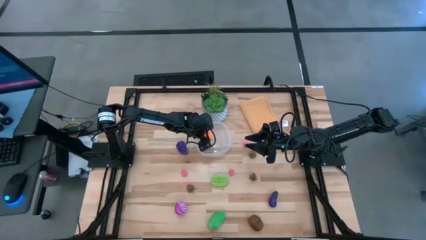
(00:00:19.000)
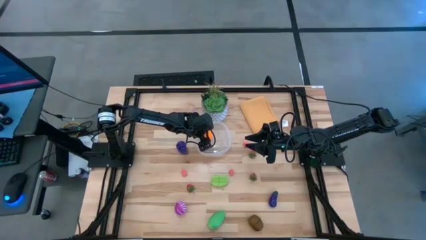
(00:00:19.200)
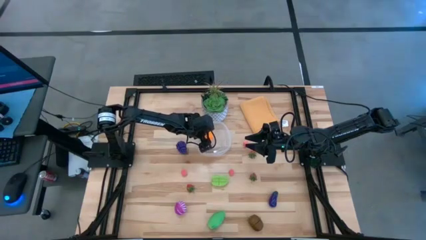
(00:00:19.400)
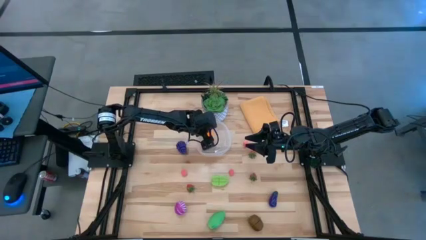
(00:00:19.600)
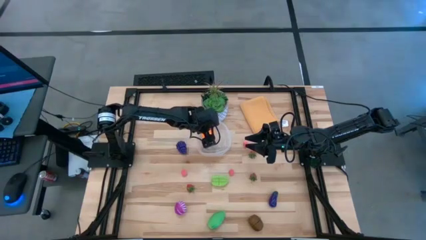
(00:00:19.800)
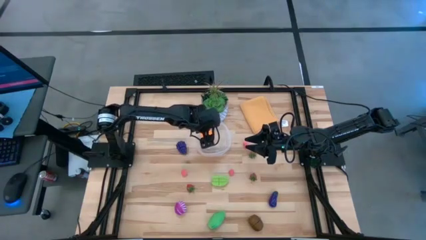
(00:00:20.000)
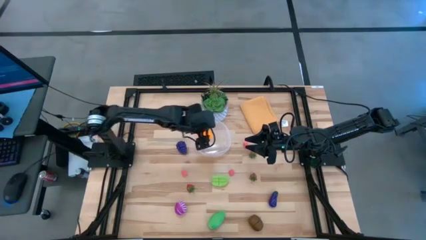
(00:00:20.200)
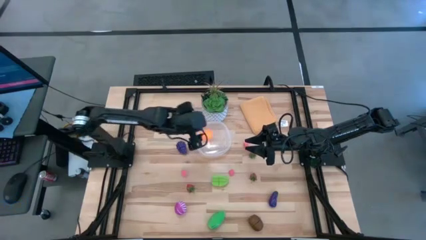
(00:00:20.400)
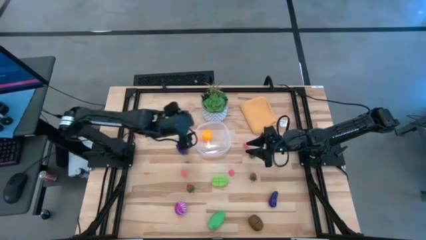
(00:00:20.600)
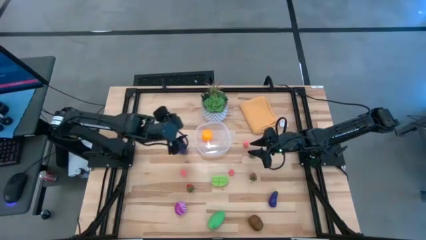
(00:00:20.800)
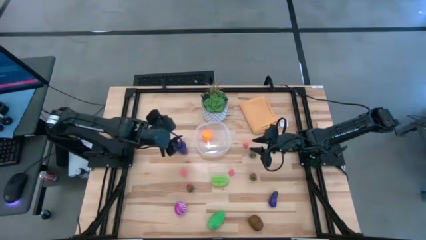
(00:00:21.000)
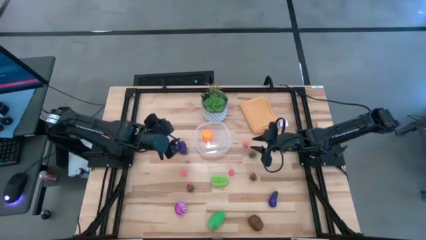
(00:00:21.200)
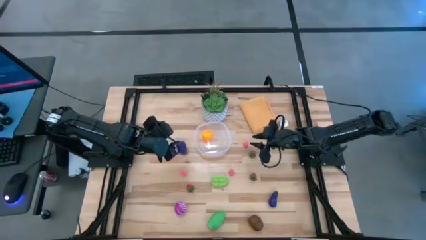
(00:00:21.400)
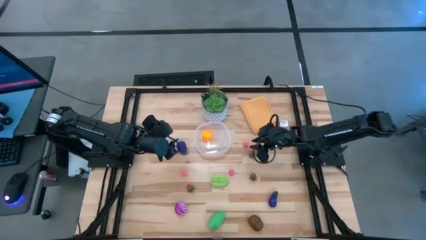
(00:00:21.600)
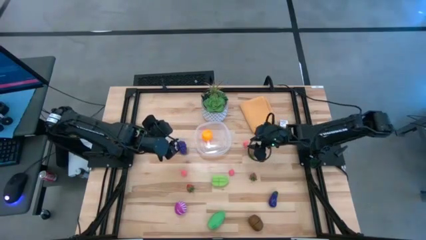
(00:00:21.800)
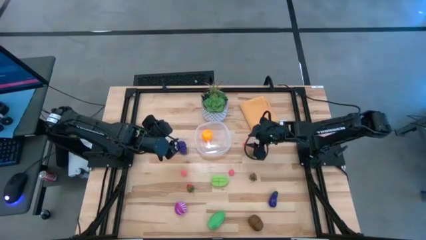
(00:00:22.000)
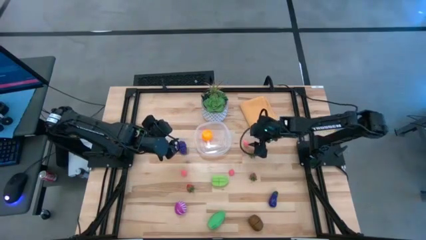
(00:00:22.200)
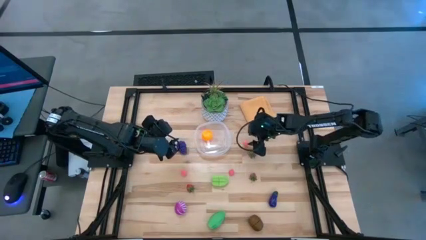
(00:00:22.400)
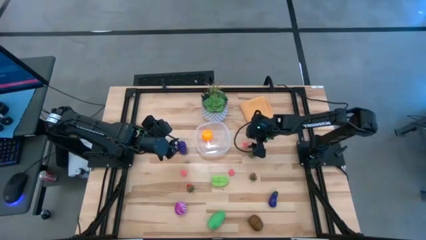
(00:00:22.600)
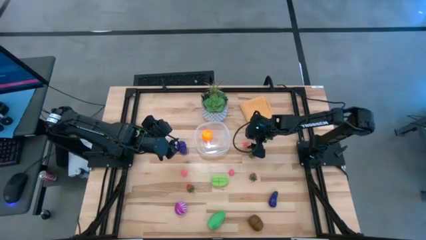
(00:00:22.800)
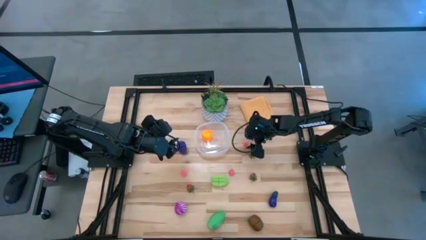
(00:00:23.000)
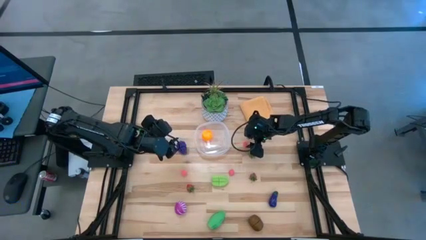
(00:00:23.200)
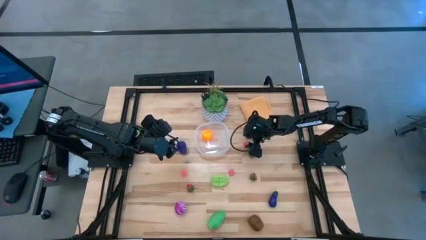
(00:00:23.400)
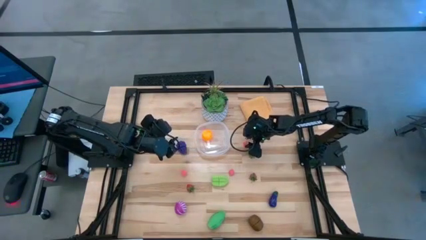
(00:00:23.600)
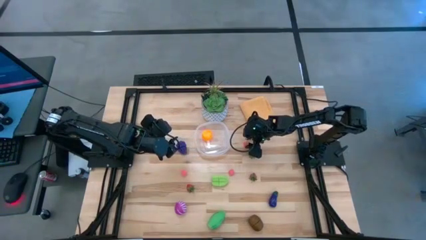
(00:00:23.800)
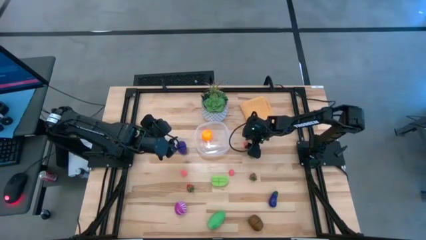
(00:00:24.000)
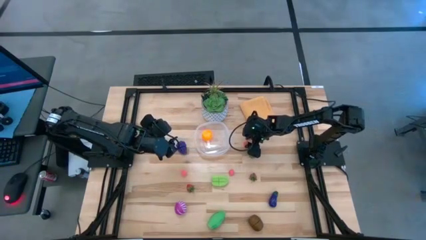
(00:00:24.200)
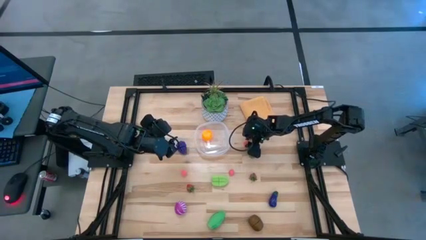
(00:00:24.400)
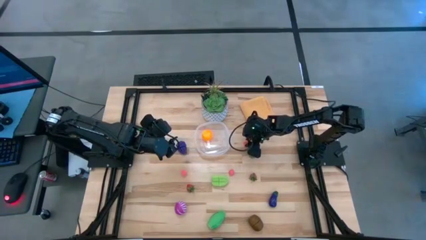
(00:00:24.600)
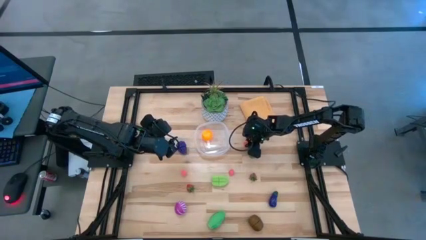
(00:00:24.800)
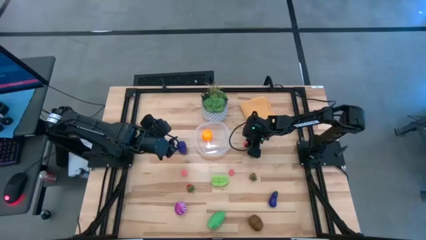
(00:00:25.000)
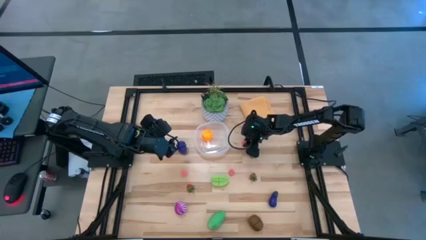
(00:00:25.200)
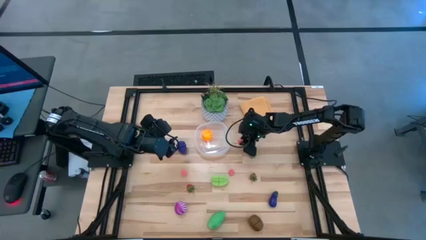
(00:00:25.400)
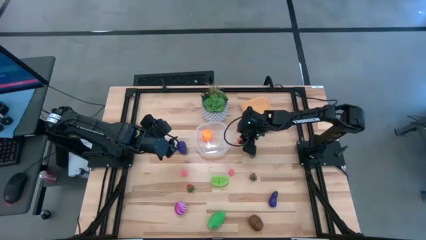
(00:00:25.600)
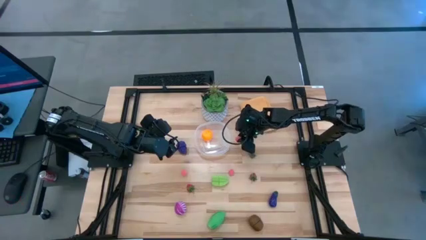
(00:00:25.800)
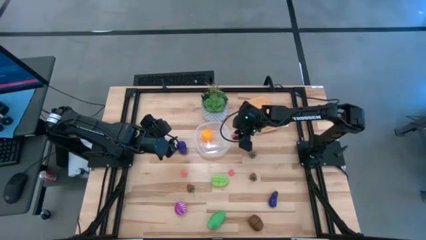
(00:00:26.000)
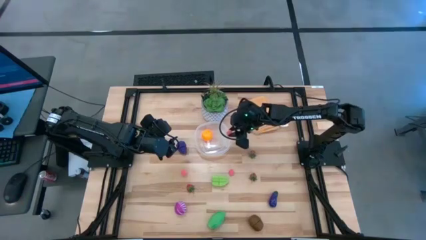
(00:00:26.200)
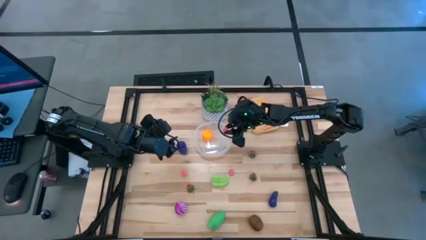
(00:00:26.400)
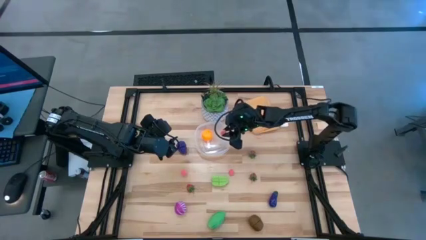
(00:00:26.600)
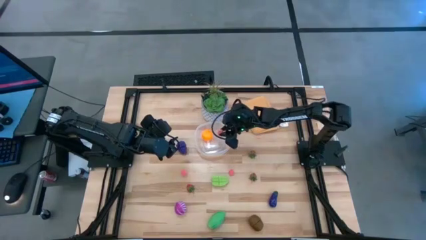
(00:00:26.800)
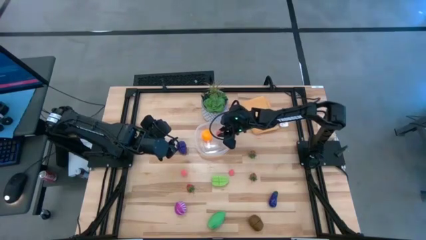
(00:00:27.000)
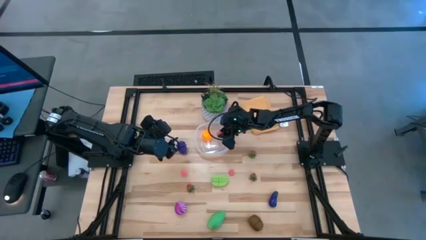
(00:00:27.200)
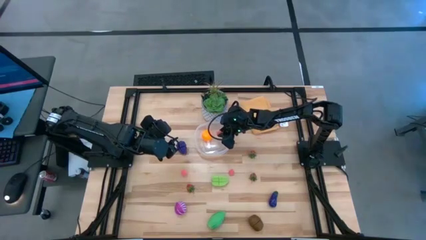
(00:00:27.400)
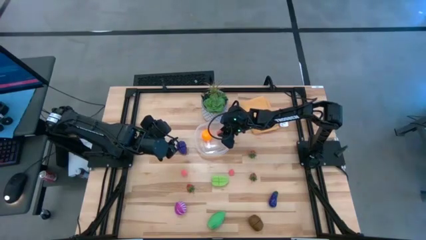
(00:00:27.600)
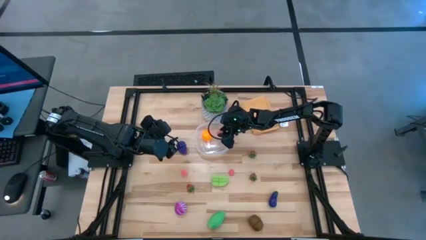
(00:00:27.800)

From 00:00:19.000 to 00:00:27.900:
Task: Pick and placing Produce into tupperware
Put the top right pink peach into the transparent bin

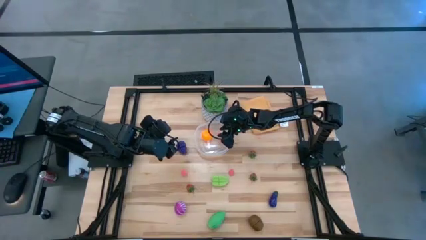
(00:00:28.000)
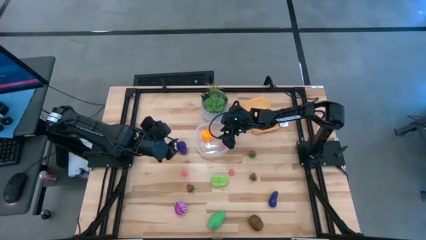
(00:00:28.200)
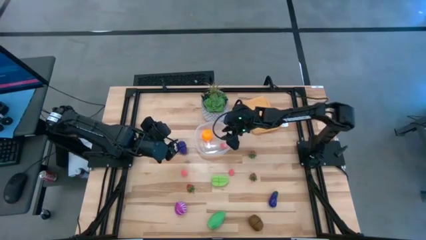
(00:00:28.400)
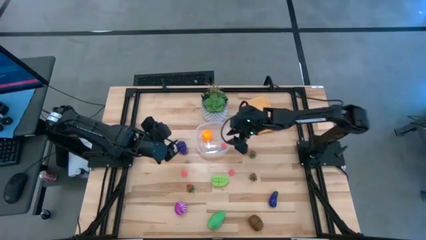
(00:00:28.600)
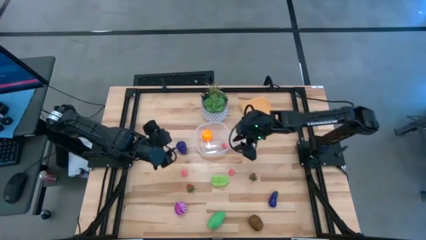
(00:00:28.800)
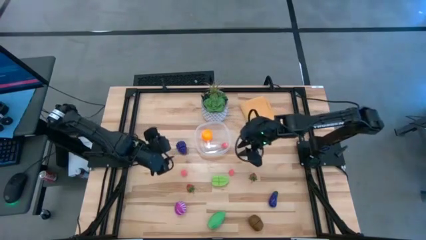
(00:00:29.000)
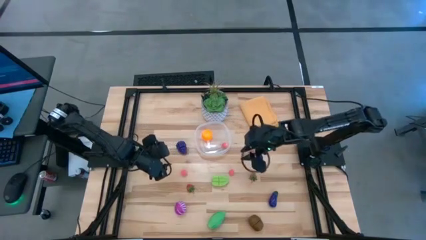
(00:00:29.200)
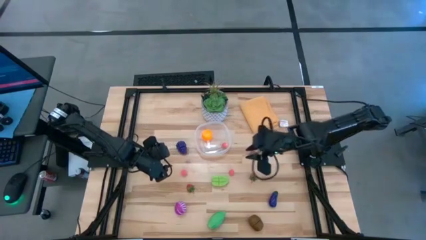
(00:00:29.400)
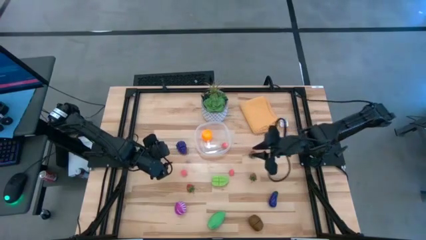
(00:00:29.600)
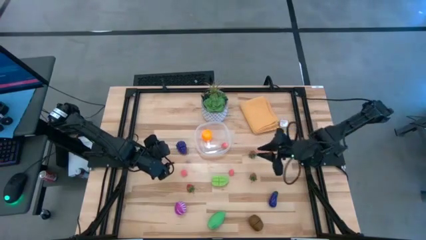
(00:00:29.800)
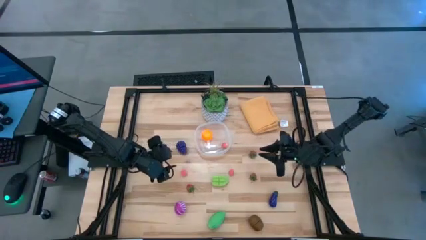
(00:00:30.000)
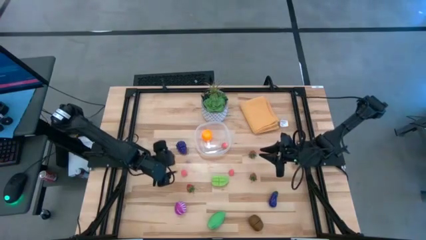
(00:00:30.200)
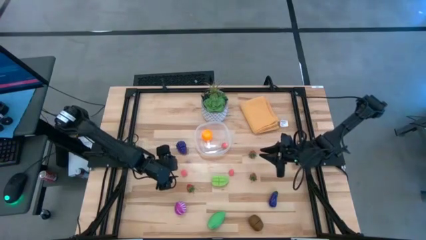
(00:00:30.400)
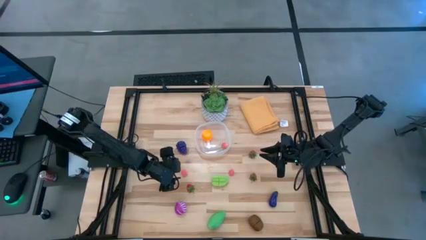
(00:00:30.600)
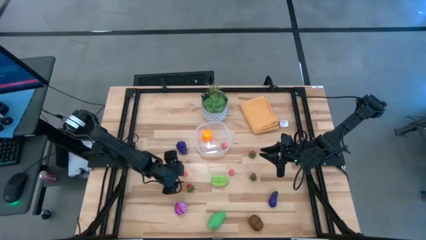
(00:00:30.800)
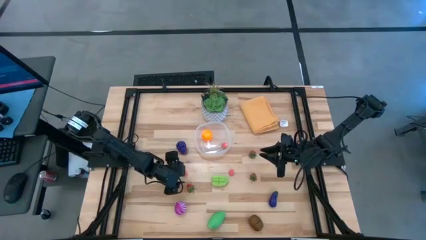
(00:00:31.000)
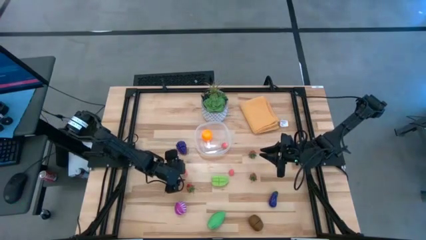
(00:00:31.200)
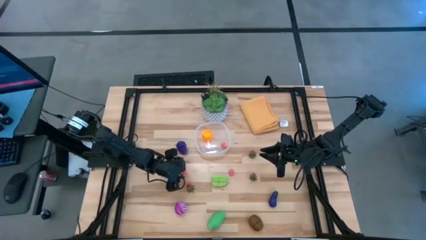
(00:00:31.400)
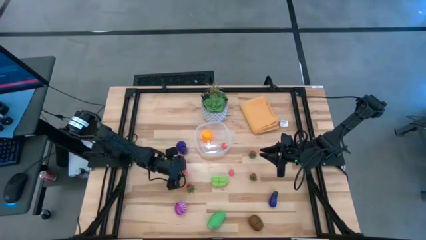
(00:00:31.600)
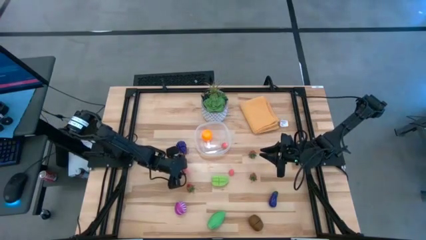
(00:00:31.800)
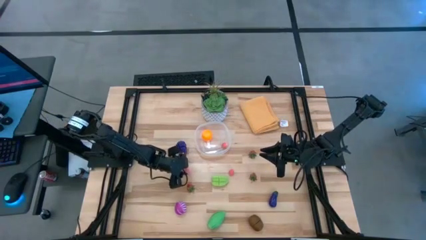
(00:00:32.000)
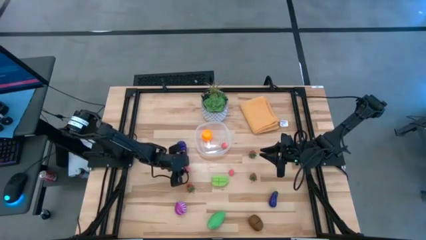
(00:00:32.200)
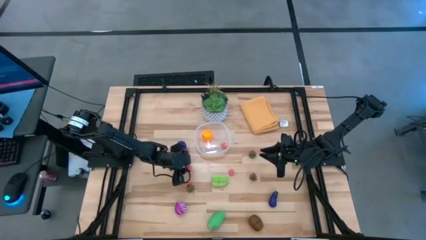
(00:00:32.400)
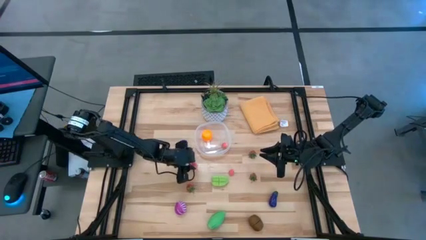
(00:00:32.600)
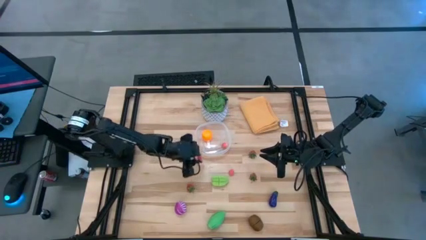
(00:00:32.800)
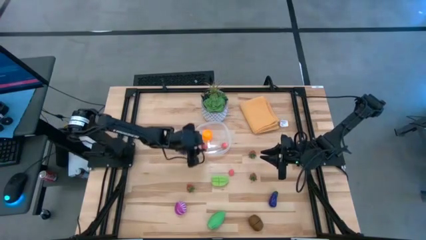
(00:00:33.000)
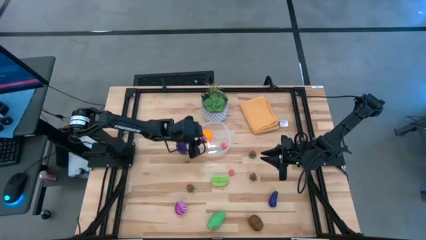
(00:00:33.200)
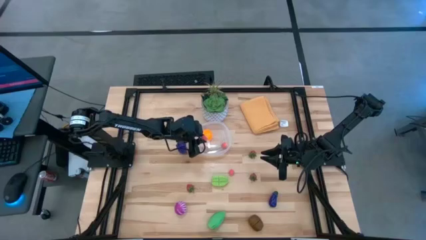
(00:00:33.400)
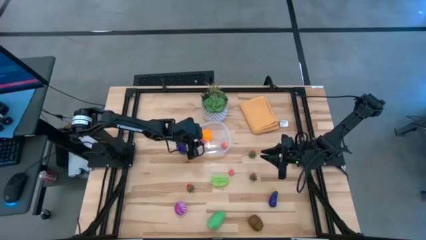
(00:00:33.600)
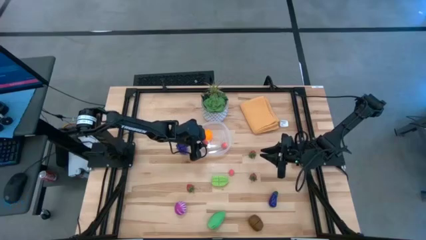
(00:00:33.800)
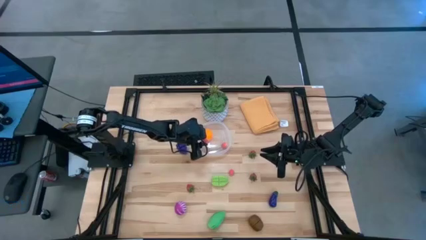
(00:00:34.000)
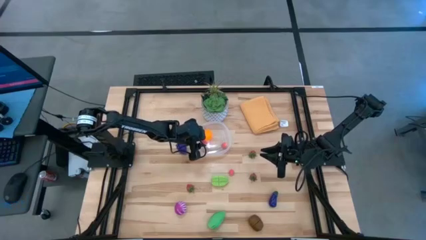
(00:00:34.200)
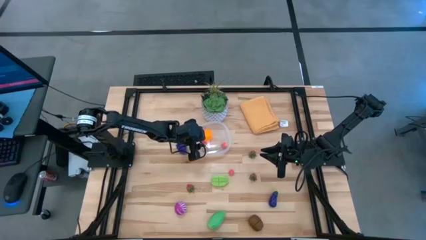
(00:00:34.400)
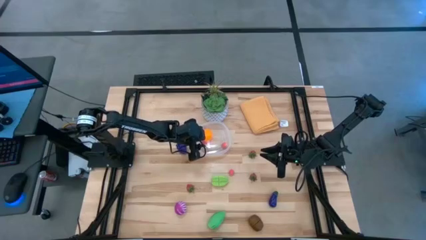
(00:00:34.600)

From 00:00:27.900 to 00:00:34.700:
Put the left peach into the transparent bin
